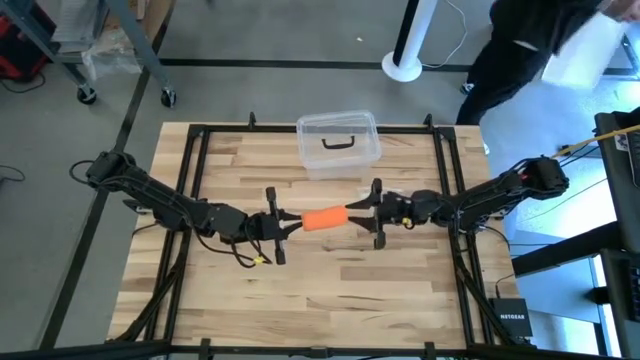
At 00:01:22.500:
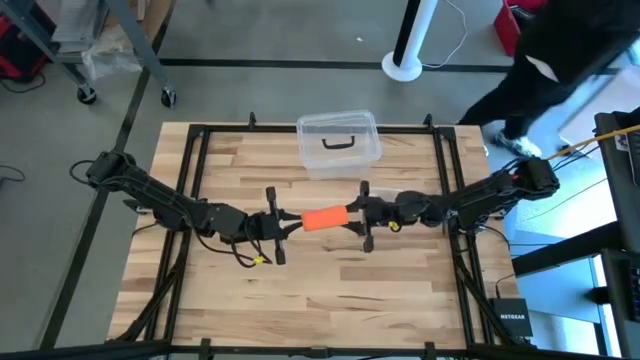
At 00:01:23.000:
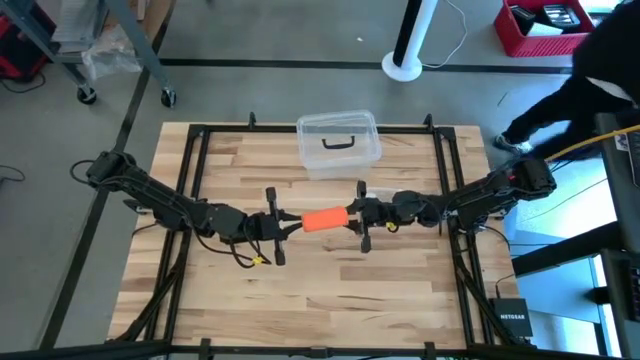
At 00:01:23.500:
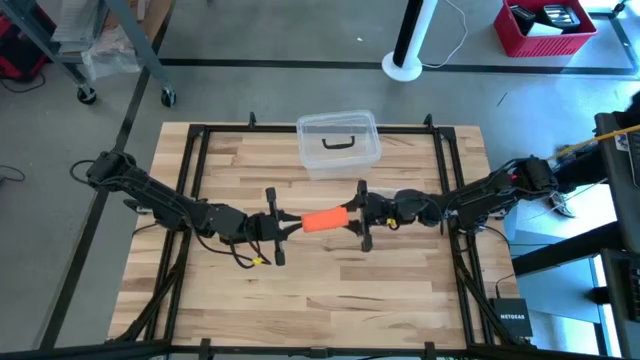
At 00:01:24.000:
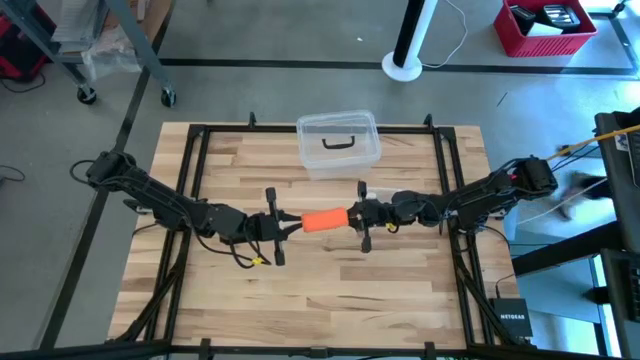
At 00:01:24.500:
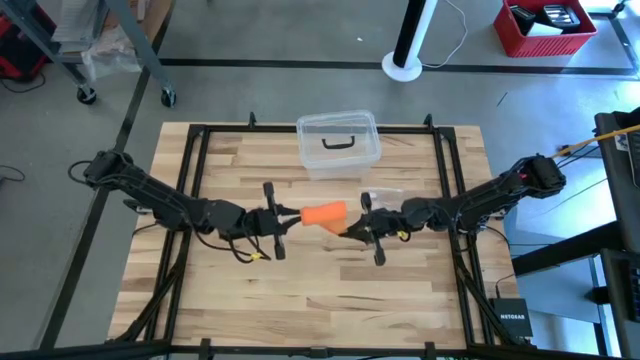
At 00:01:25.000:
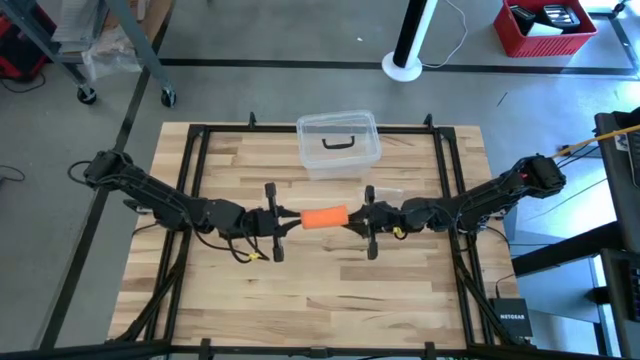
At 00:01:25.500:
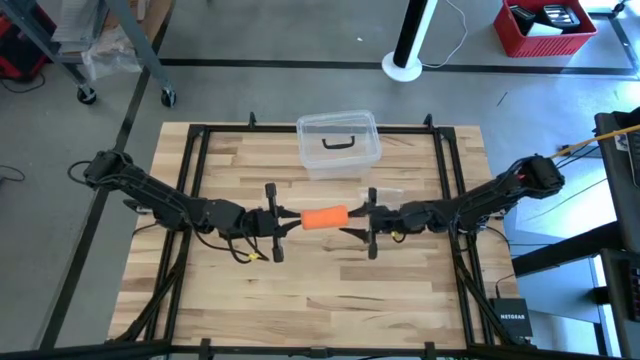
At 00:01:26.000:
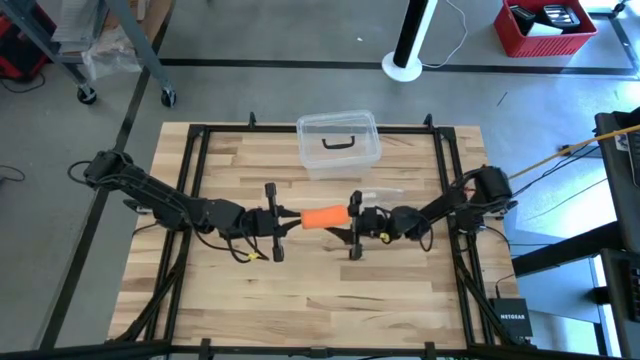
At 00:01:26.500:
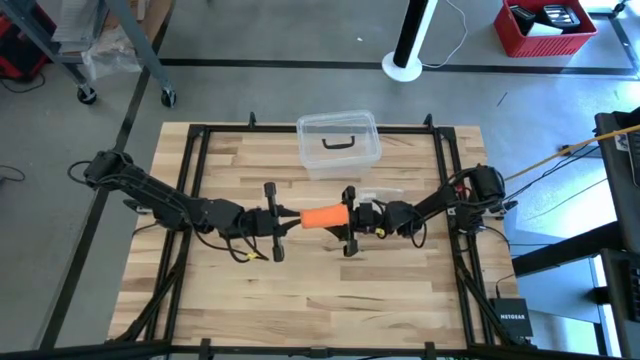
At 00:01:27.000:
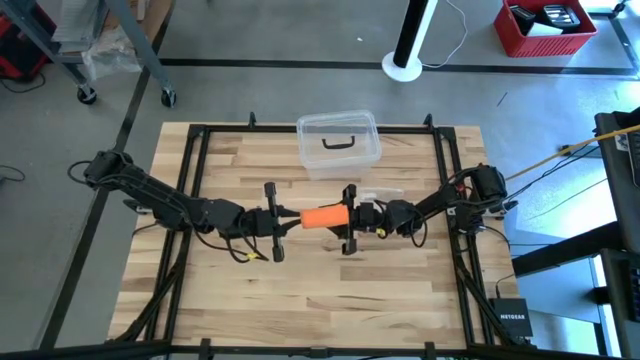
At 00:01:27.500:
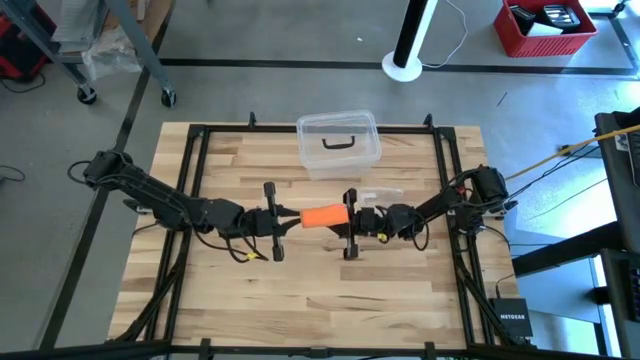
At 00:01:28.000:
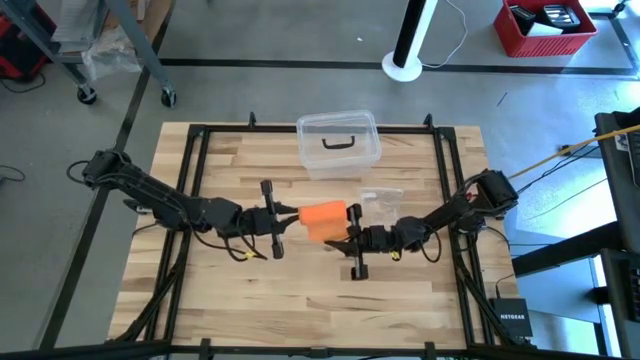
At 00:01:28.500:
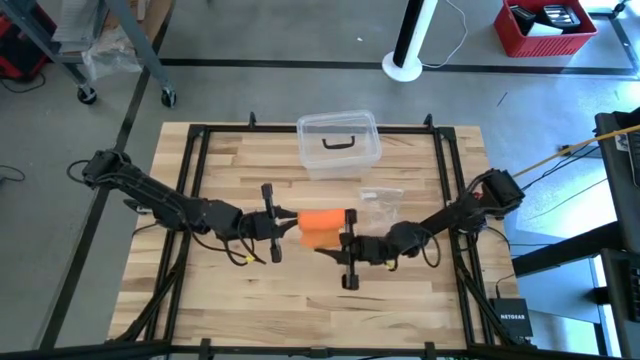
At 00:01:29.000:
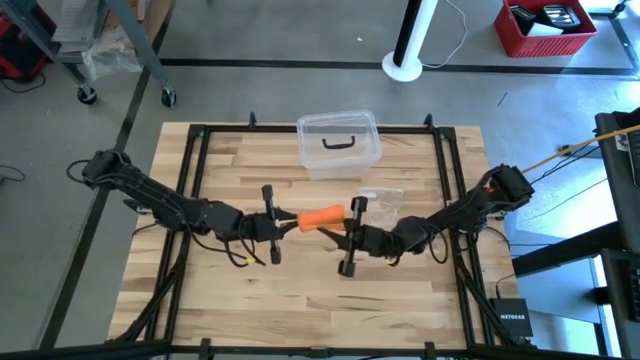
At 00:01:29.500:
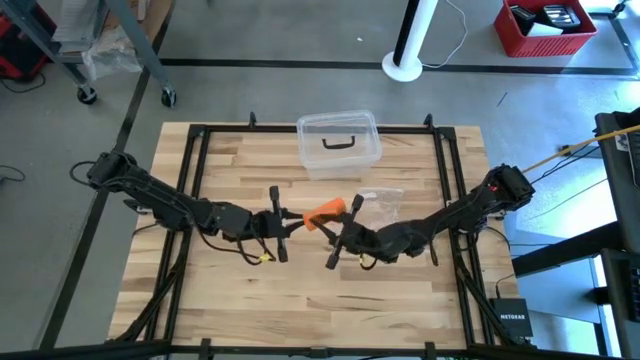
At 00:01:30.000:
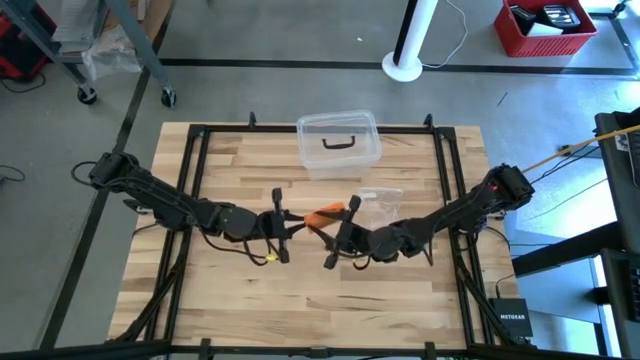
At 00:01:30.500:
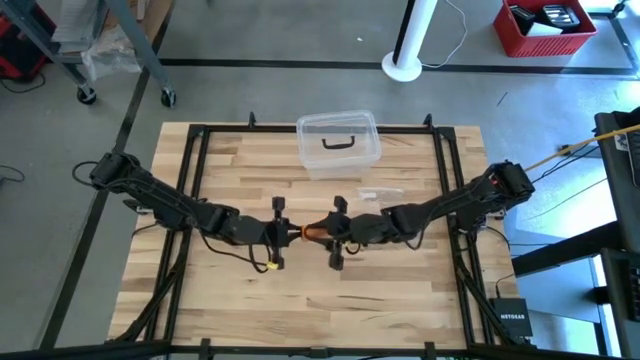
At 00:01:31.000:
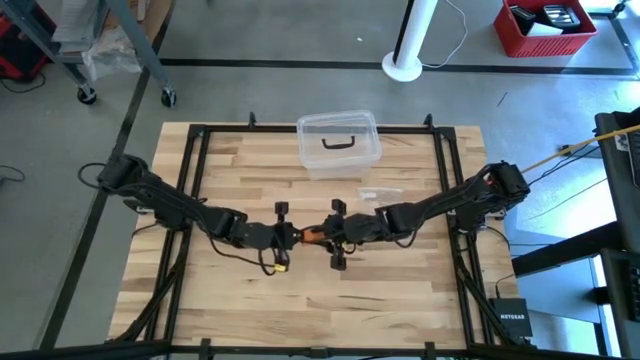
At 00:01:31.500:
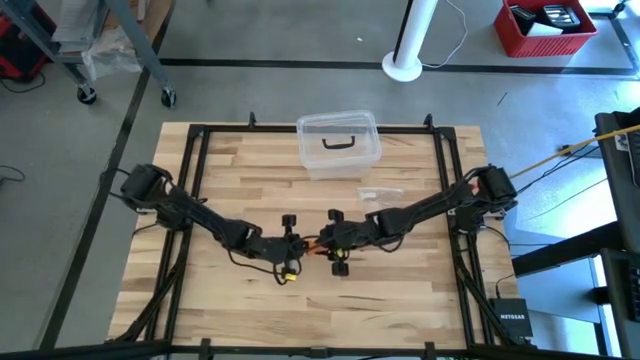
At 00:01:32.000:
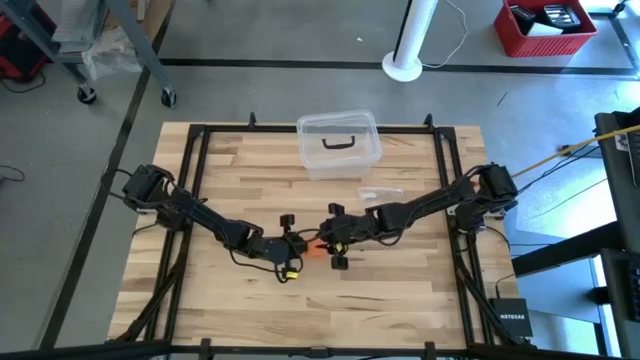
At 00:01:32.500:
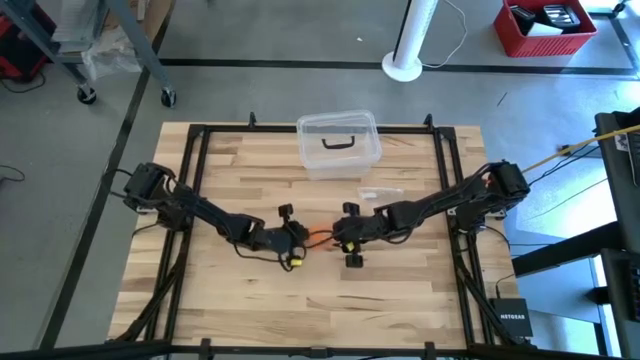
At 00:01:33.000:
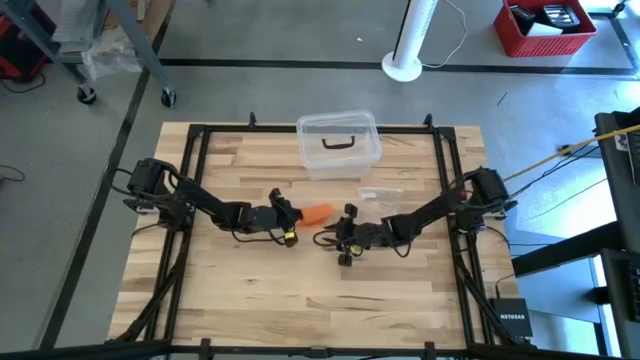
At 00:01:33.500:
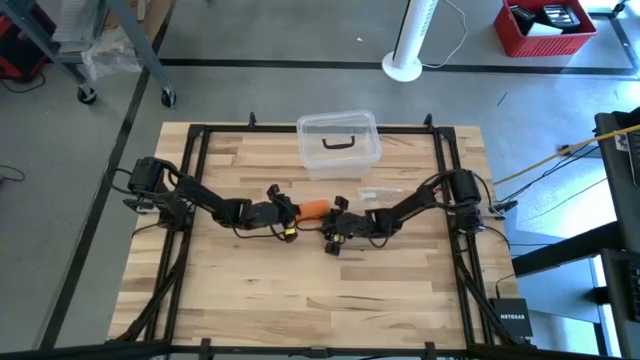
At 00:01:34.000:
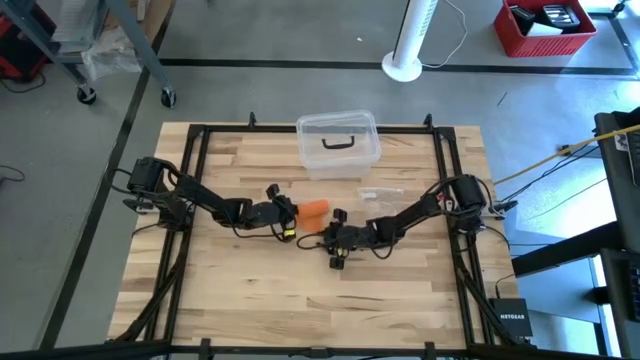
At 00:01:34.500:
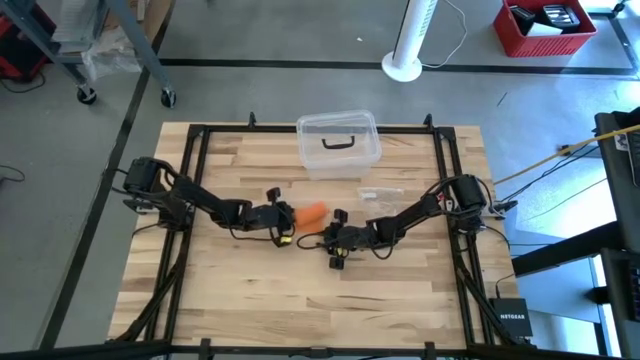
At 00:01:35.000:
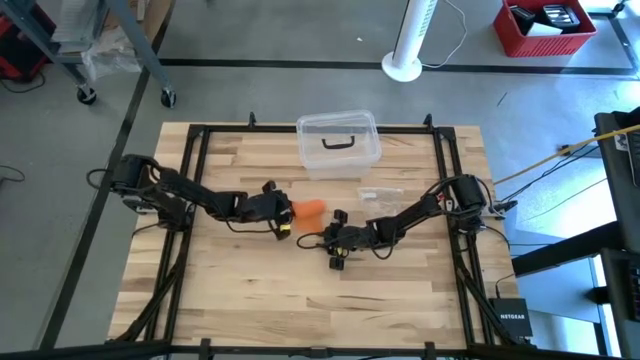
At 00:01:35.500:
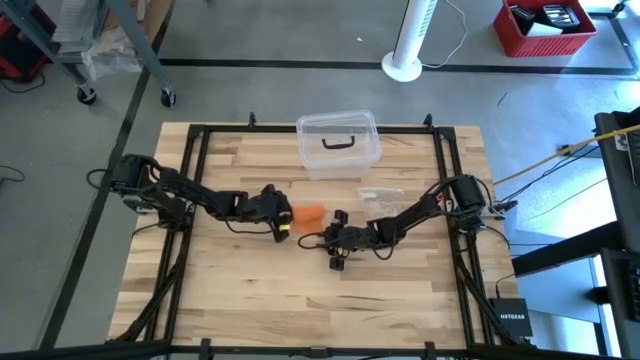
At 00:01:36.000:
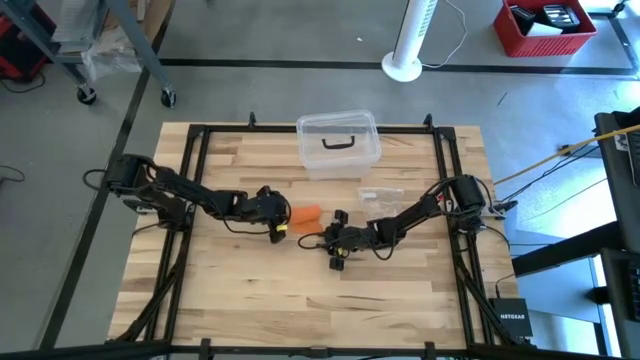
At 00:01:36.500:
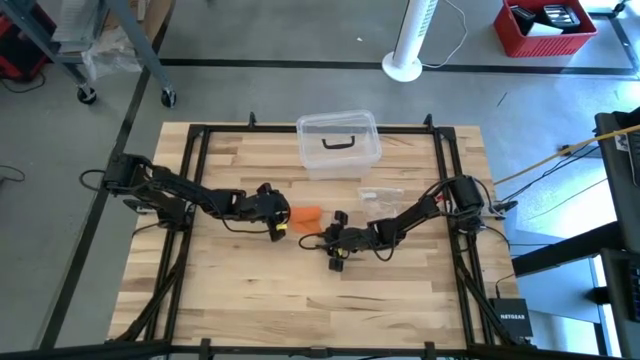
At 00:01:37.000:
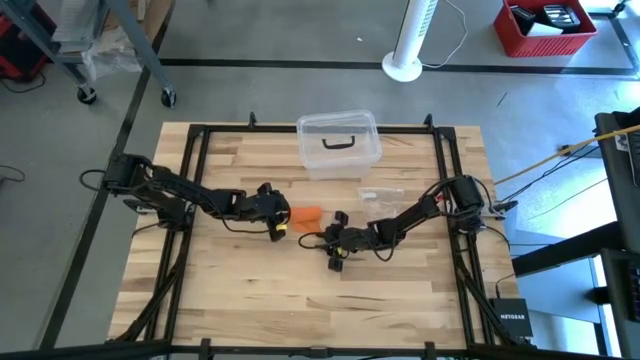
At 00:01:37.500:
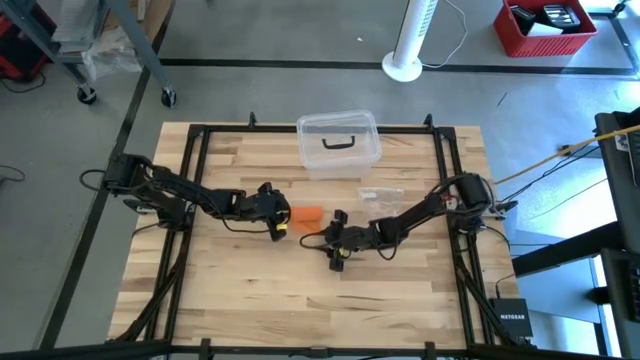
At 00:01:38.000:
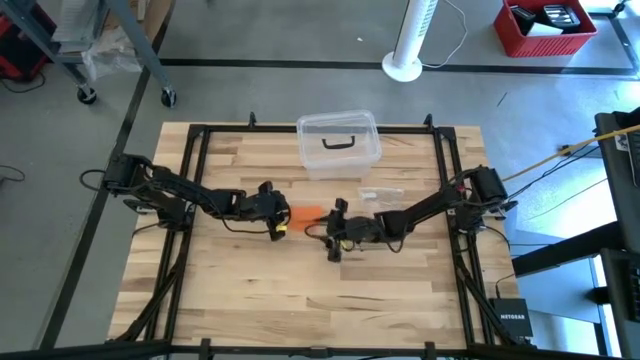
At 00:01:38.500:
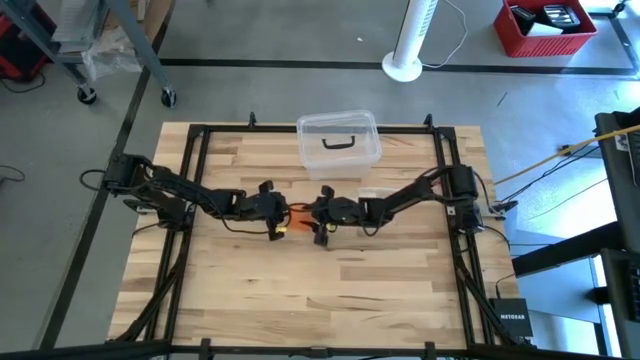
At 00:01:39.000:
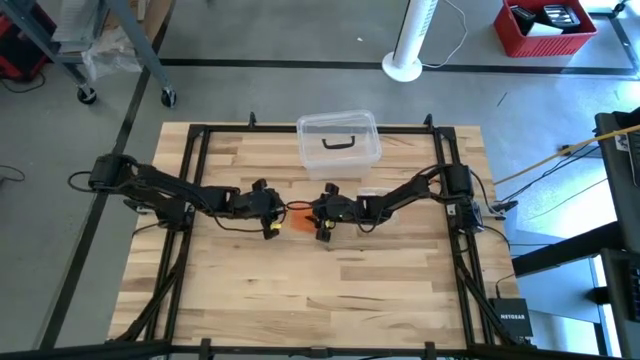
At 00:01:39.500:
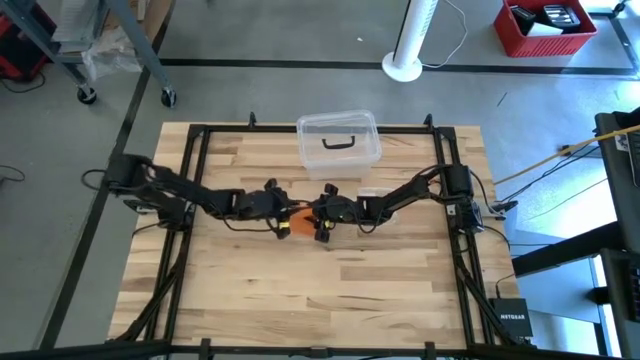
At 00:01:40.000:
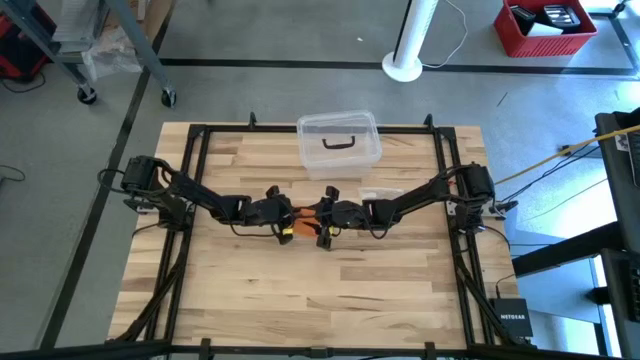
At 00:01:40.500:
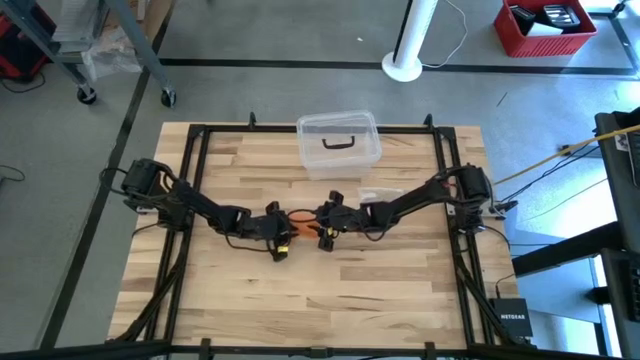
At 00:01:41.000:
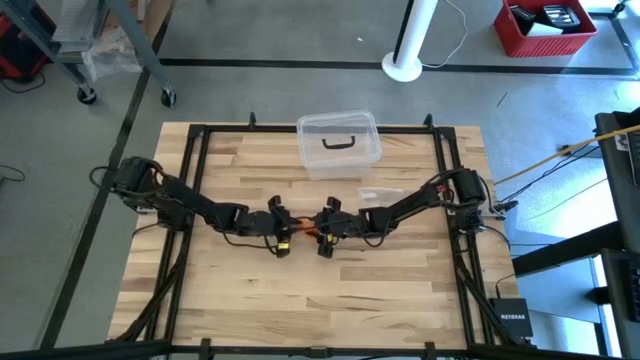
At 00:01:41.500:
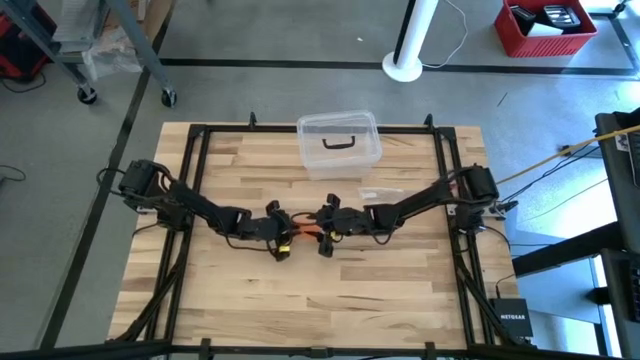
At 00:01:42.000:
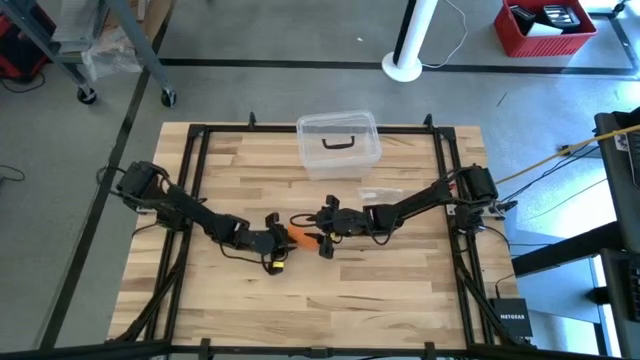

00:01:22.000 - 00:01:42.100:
Task: Roll bandage
Roll the orange bandage
